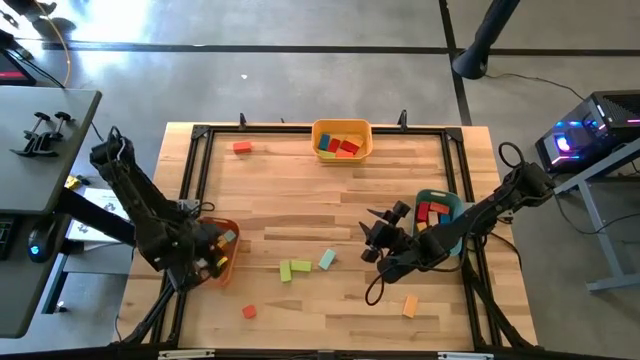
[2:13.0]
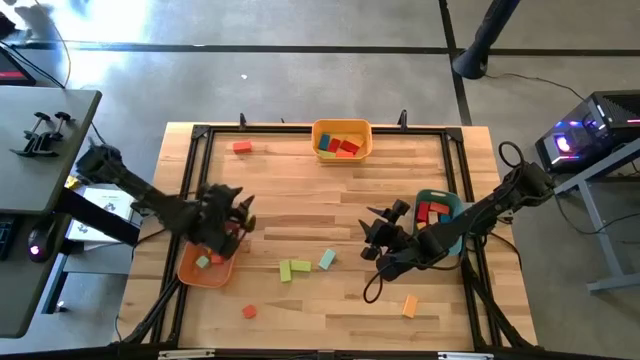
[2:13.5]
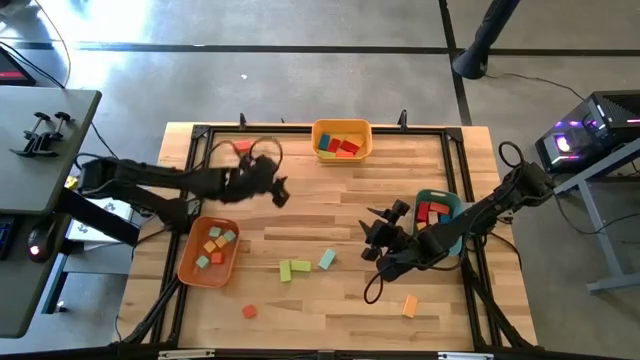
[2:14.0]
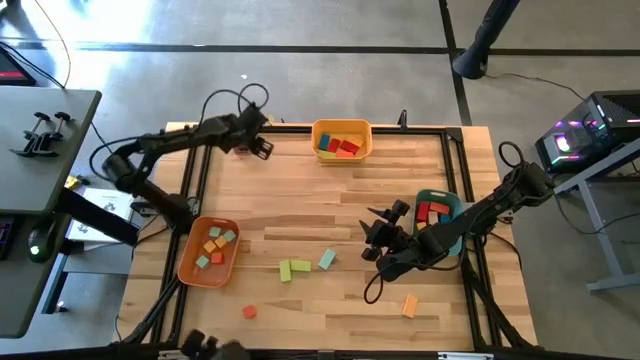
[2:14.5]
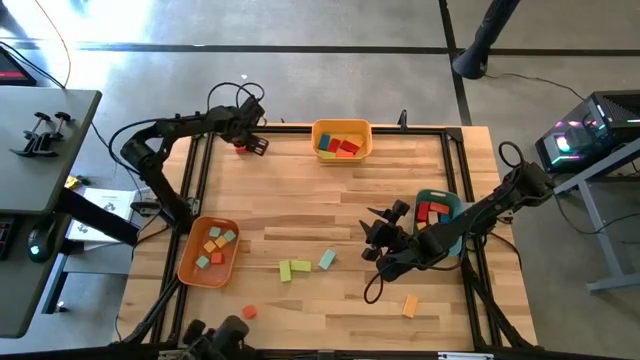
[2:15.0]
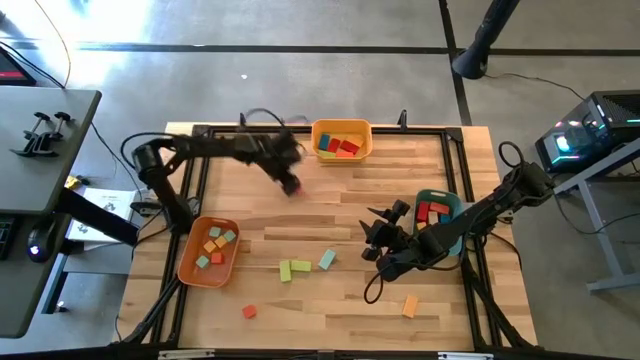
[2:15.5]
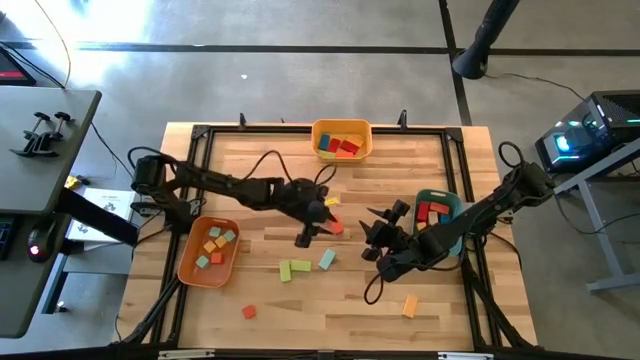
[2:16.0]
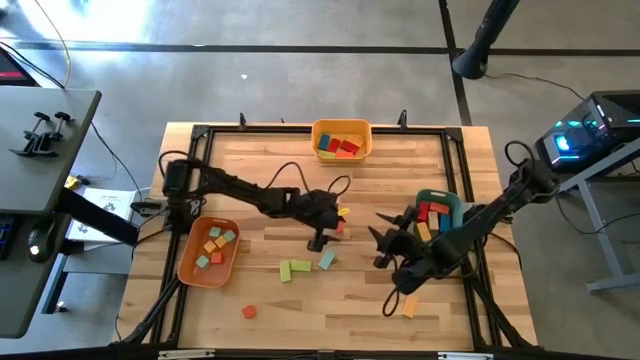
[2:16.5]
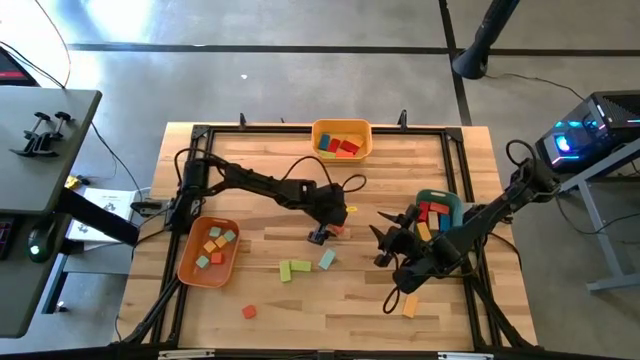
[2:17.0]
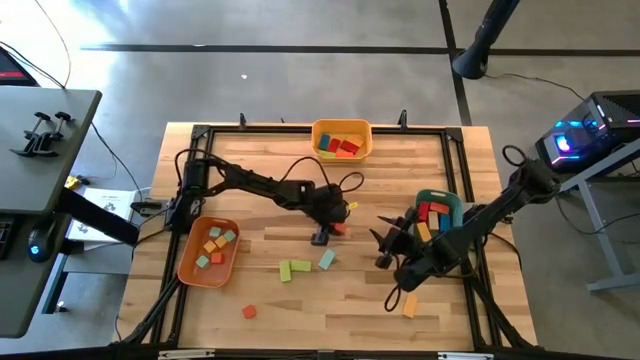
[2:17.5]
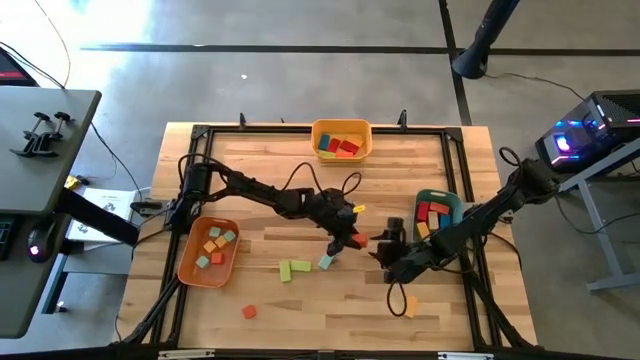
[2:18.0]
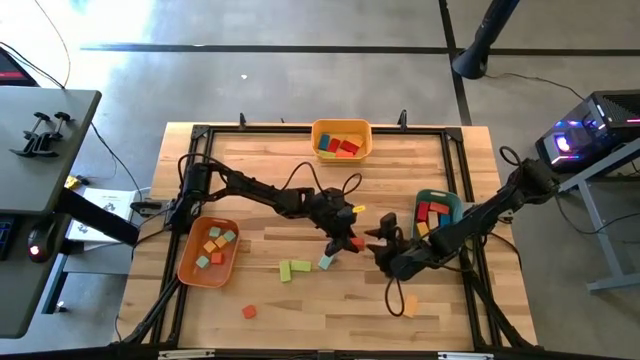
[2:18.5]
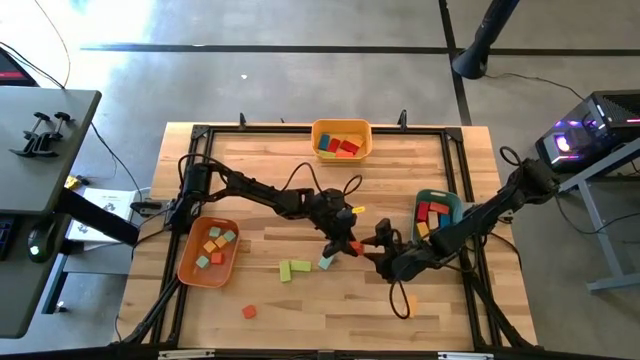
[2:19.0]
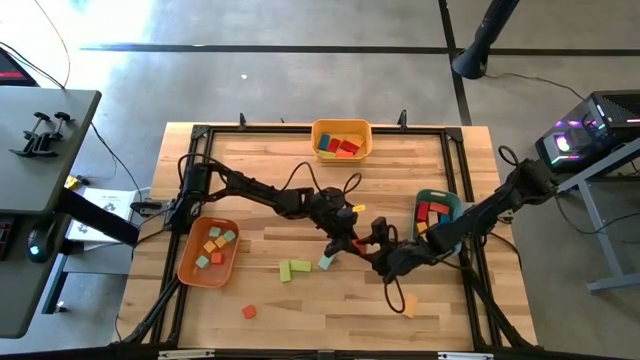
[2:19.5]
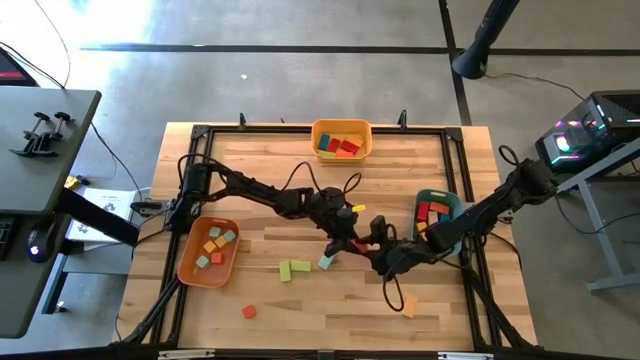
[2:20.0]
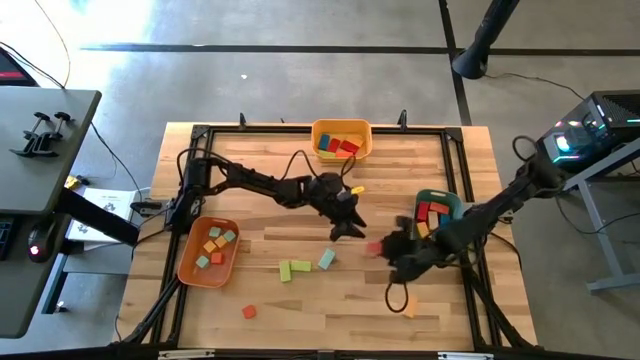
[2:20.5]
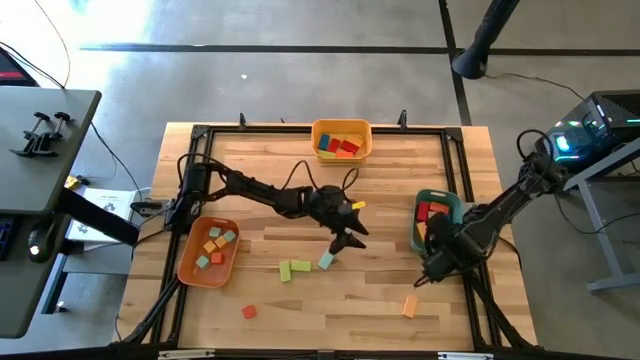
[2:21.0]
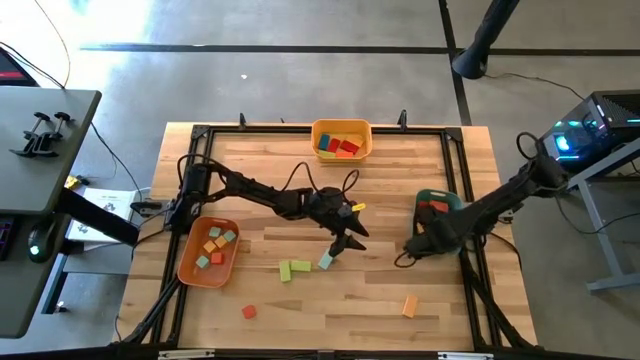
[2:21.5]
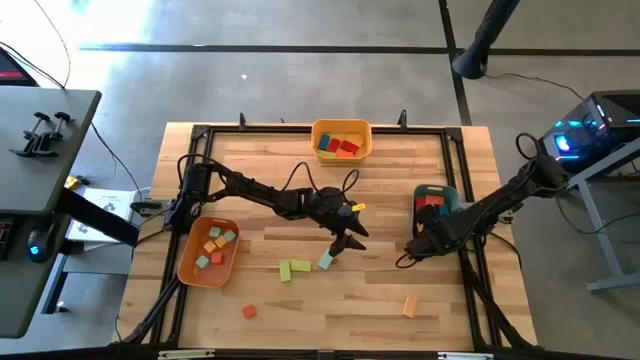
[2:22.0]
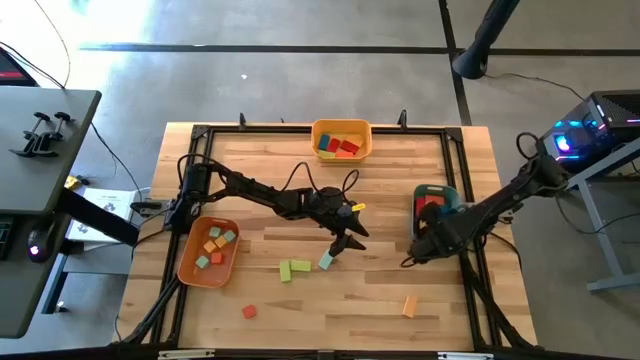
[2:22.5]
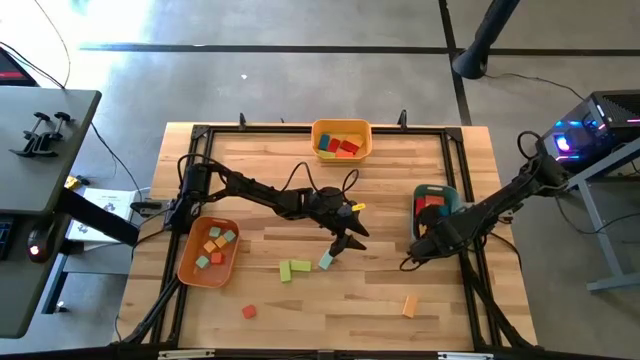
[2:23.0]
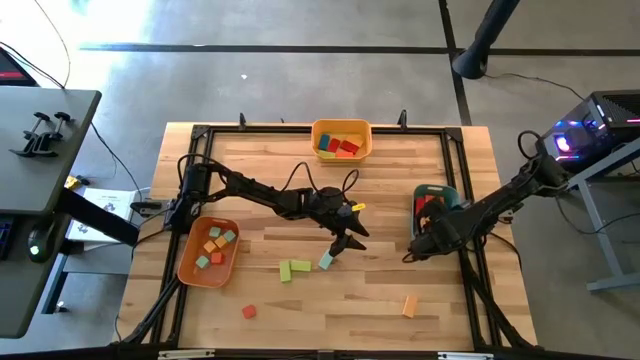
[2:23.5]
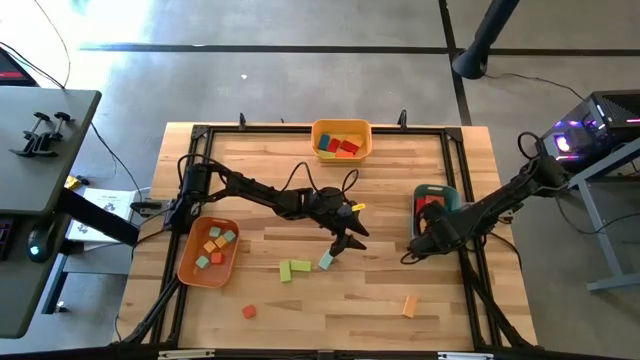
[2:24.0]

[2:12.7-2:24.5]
Task: Sort blocks by size
Put the orange thick rectangular block into the blue bin

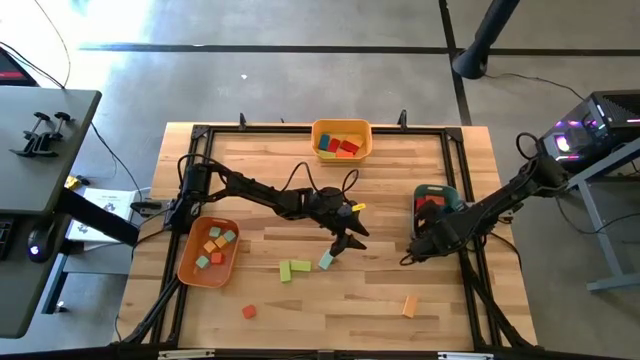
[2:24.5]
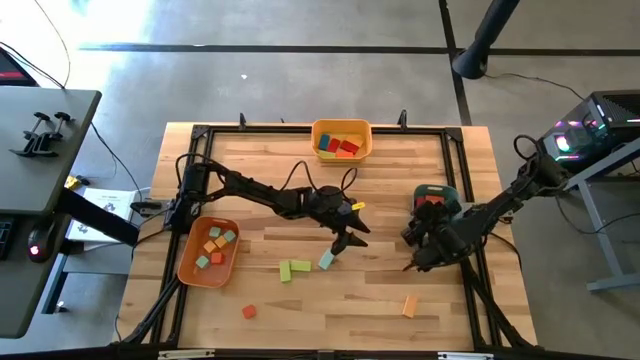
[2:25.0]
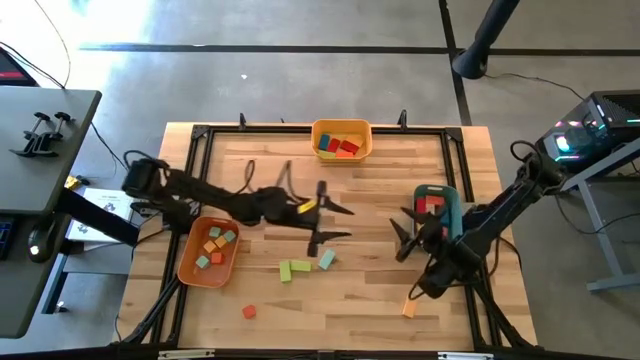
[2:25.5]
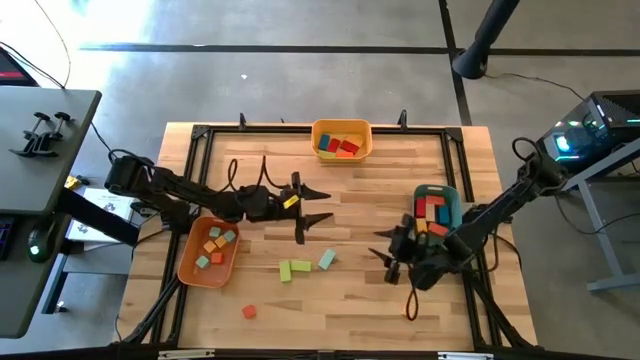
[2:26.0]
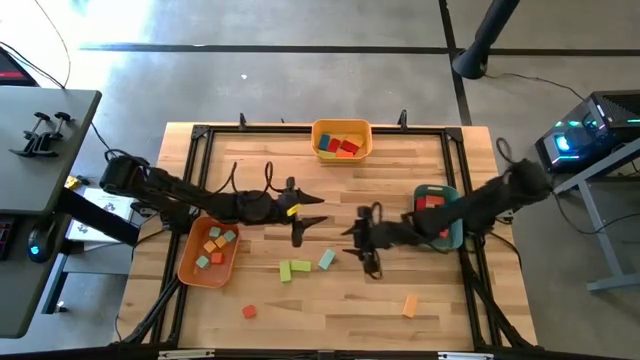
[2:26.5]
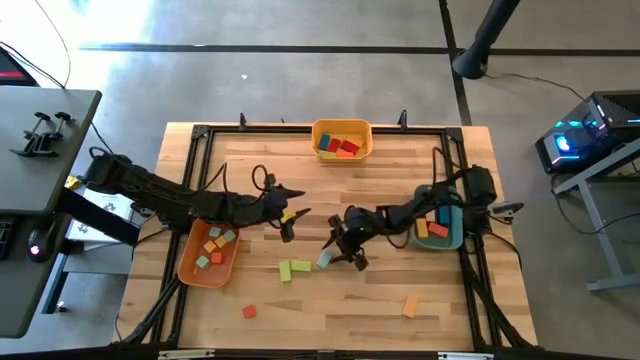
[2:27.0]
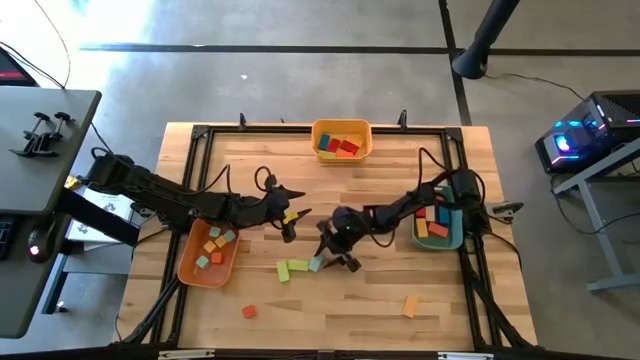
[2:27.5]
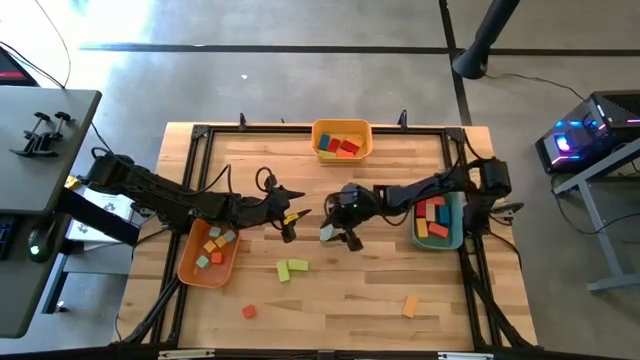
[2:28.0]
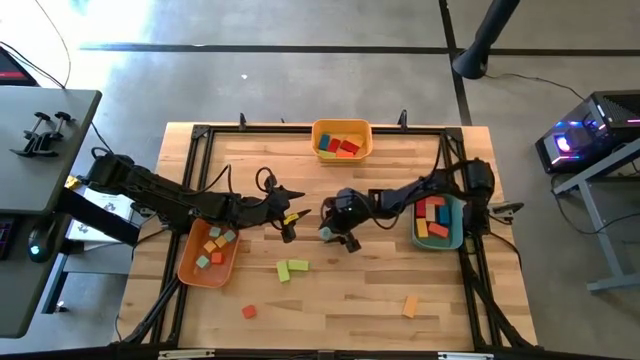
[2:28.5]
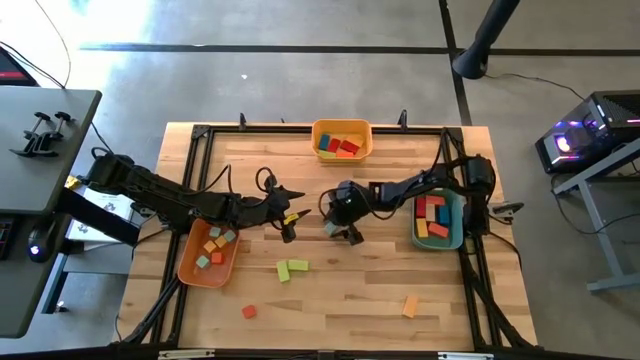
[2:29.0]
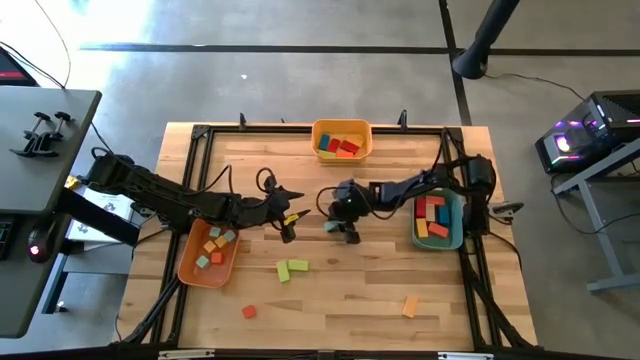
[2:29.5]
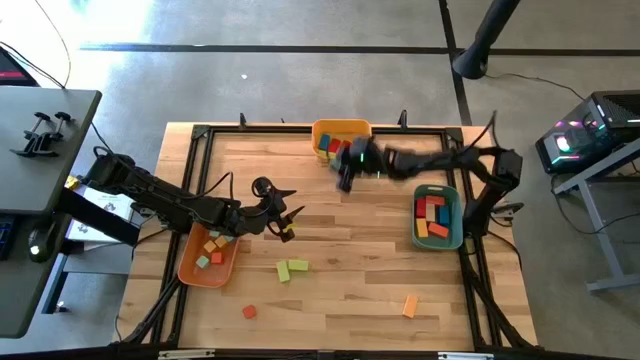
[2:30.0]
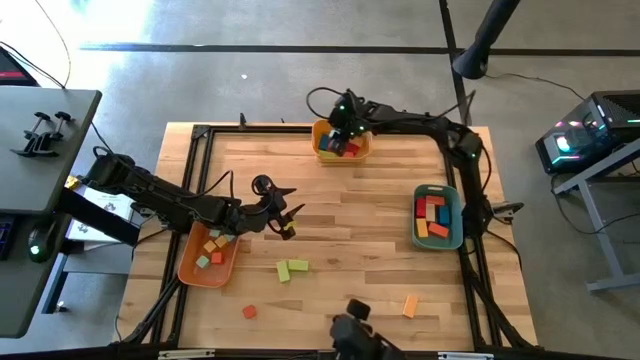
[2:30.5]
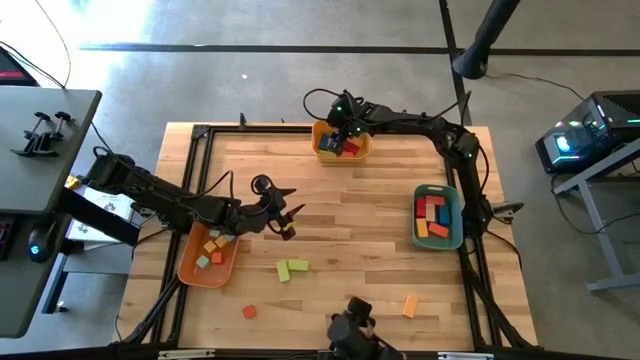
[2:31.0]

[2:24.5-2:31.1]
Put the light blue thin rectangular block into the yellow bin

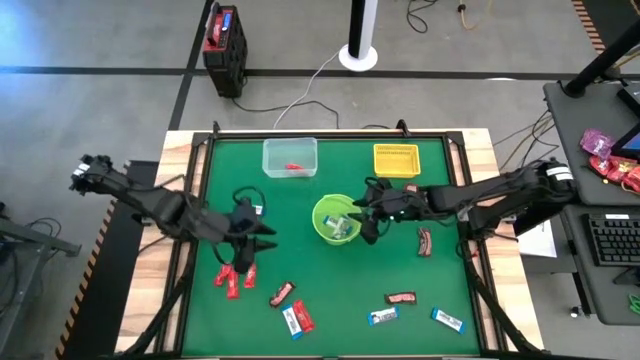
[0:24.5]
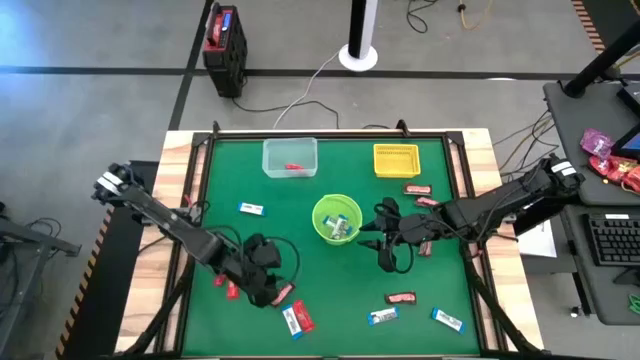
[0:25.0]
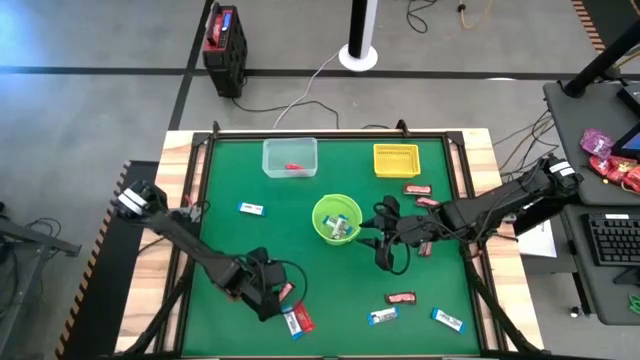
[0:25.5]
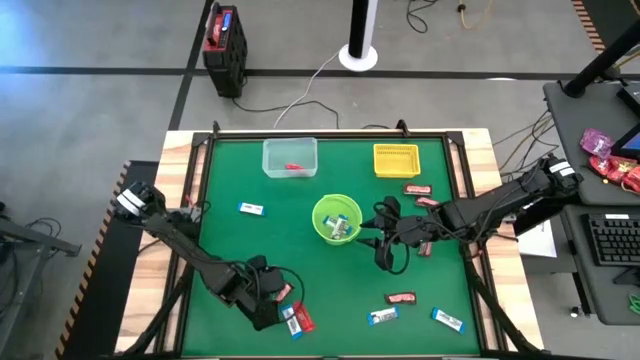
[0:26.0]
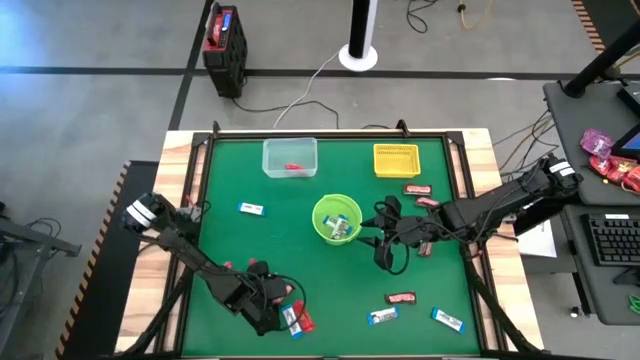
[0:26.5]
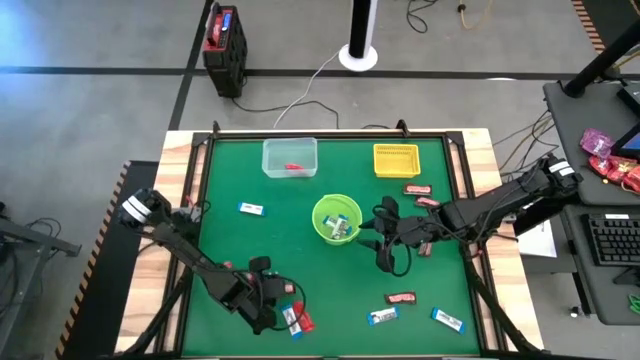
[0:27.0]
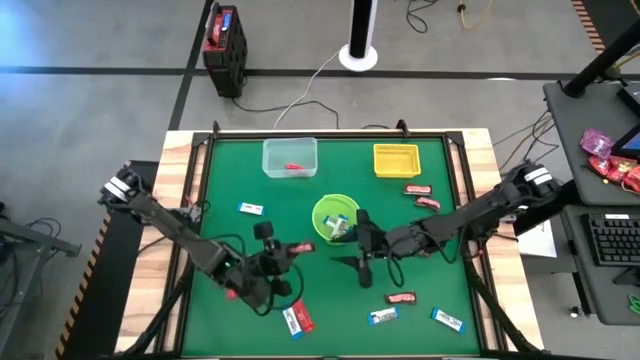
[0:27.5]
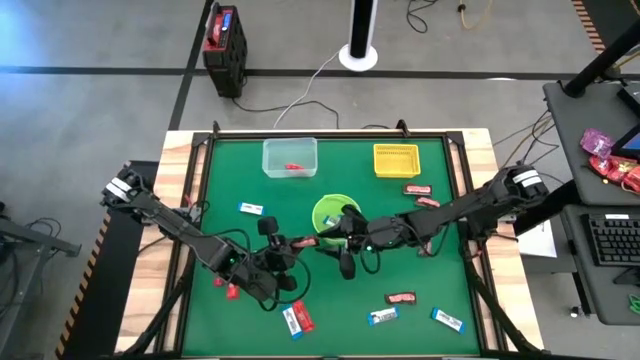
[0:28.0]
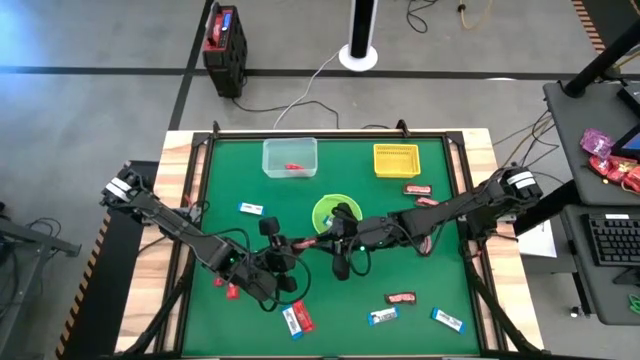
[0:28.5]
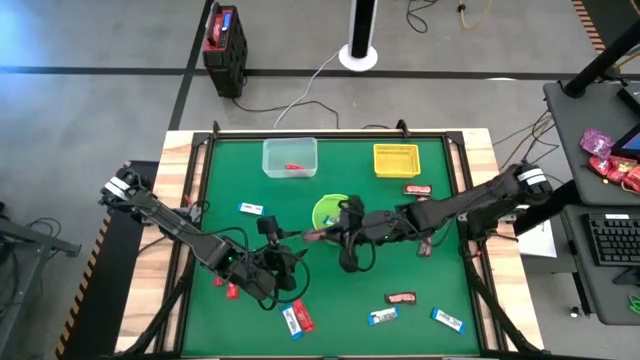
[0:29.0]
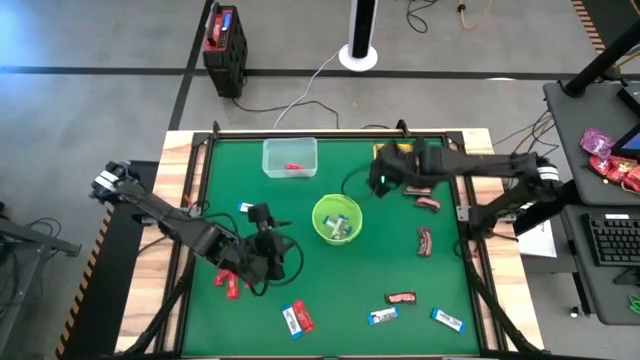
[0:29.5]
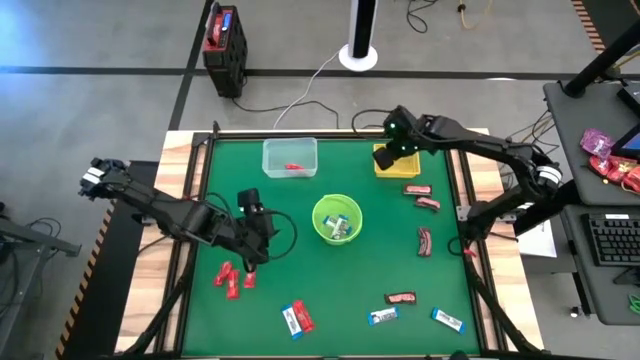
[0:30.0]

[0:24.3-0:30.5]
Task: Sort candy by brand, put in halloween buckets
Put the brown chocolate into the yellow bin
